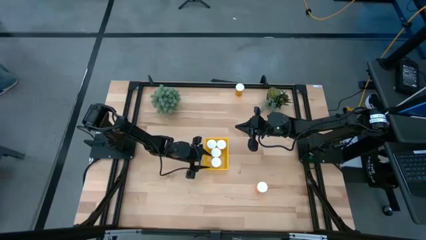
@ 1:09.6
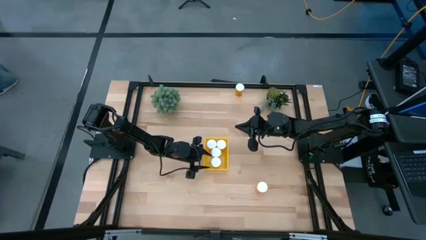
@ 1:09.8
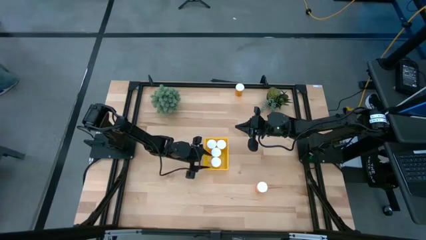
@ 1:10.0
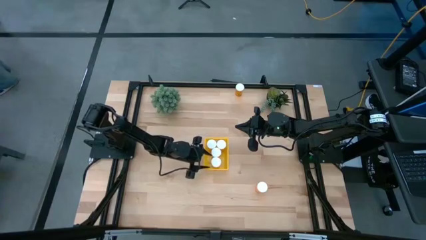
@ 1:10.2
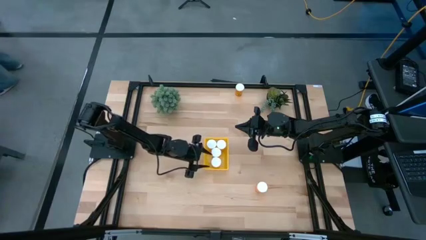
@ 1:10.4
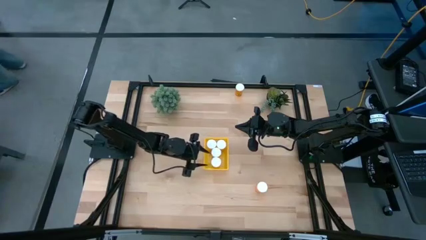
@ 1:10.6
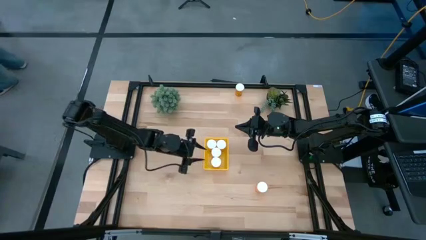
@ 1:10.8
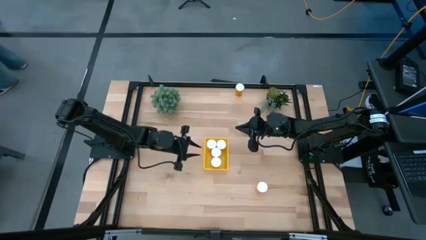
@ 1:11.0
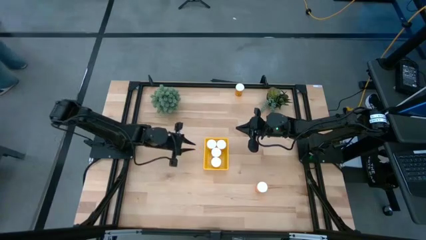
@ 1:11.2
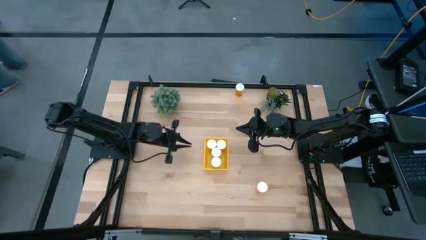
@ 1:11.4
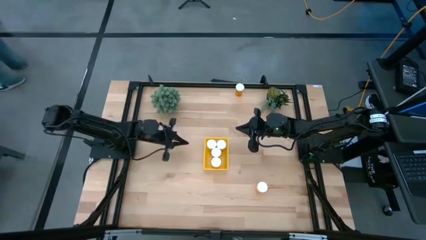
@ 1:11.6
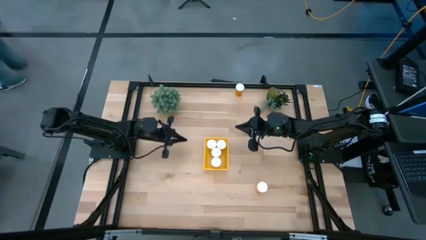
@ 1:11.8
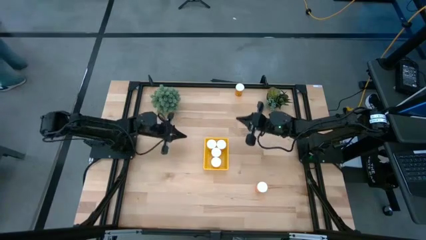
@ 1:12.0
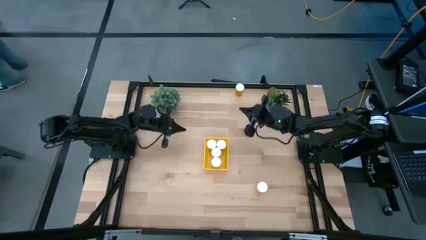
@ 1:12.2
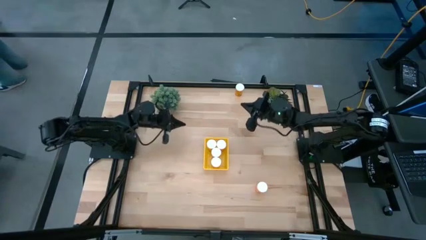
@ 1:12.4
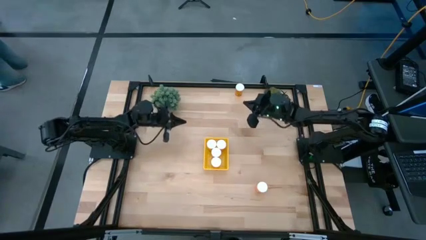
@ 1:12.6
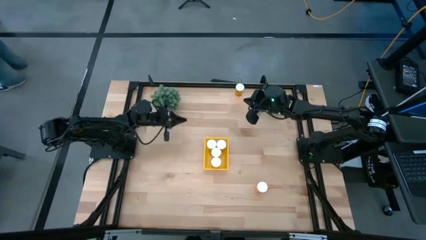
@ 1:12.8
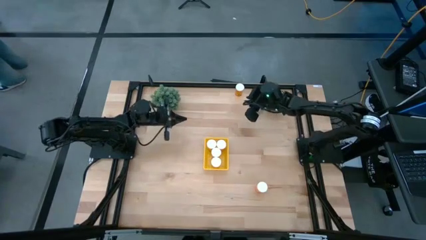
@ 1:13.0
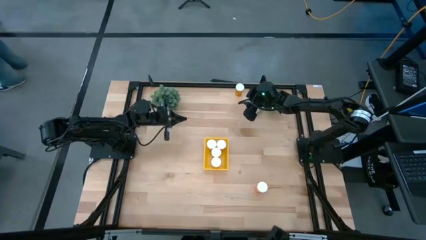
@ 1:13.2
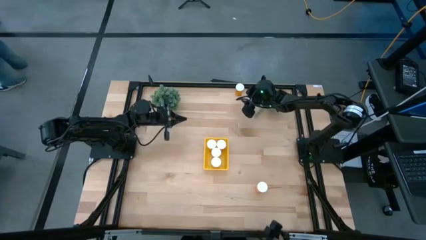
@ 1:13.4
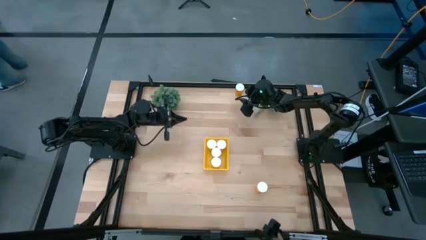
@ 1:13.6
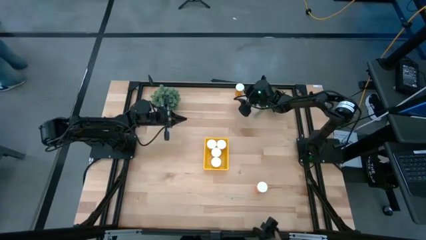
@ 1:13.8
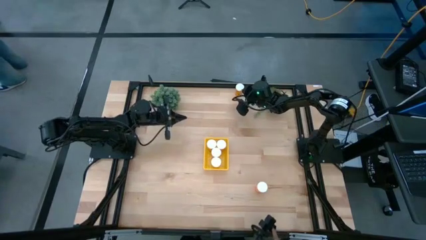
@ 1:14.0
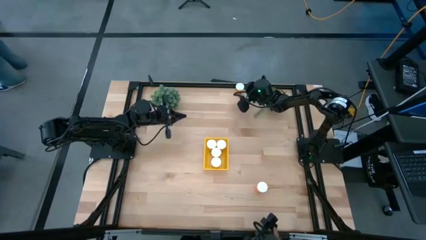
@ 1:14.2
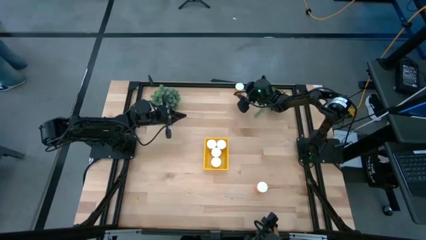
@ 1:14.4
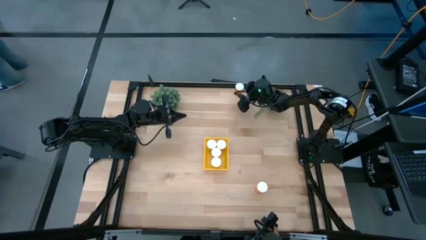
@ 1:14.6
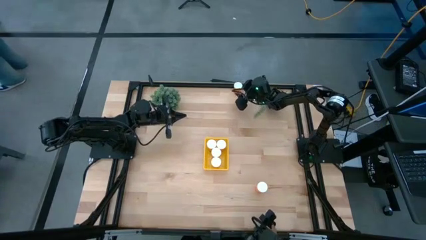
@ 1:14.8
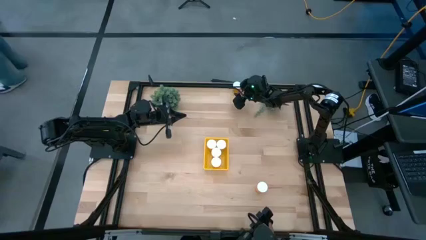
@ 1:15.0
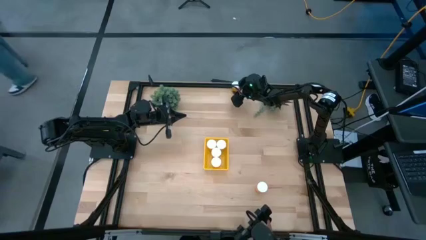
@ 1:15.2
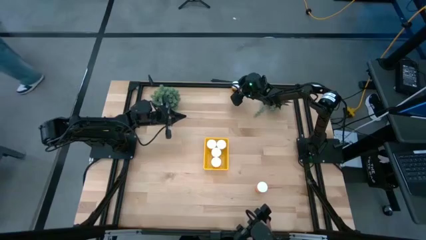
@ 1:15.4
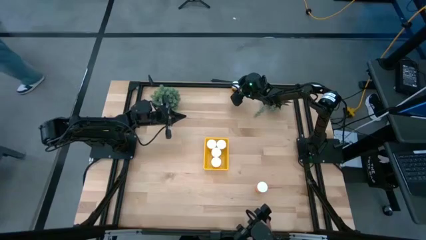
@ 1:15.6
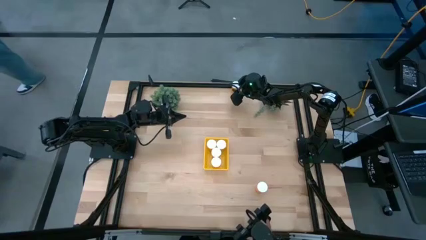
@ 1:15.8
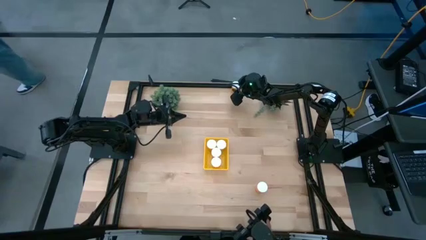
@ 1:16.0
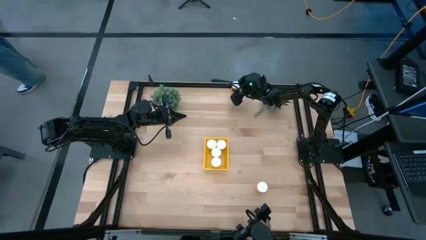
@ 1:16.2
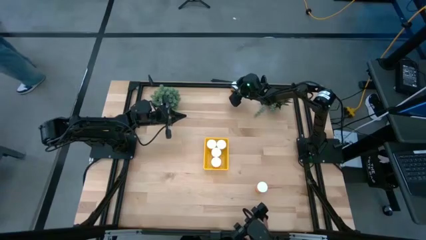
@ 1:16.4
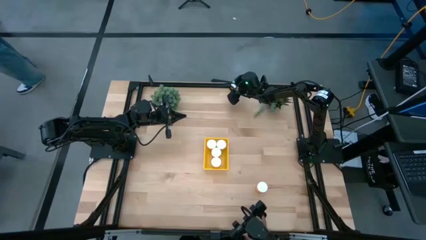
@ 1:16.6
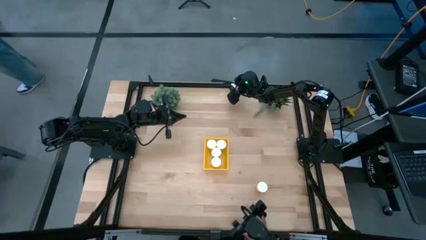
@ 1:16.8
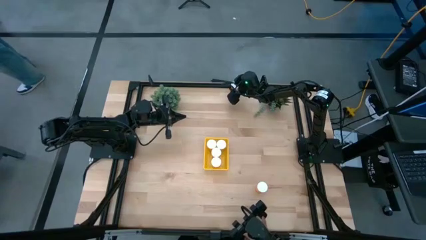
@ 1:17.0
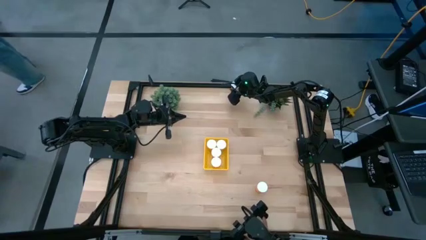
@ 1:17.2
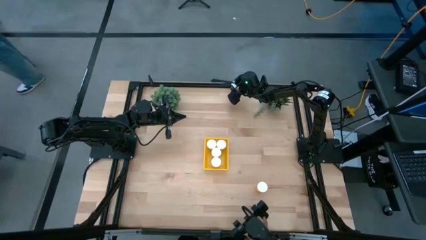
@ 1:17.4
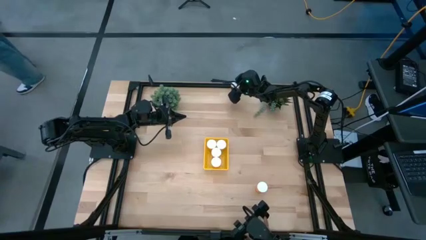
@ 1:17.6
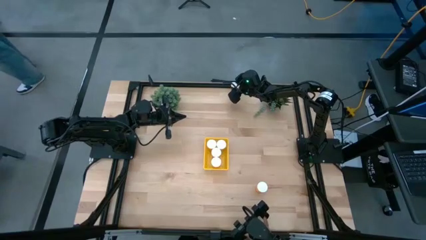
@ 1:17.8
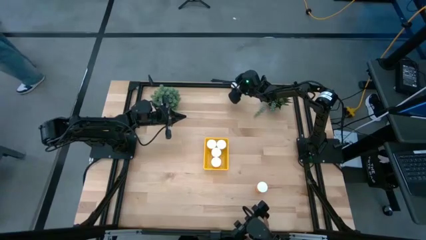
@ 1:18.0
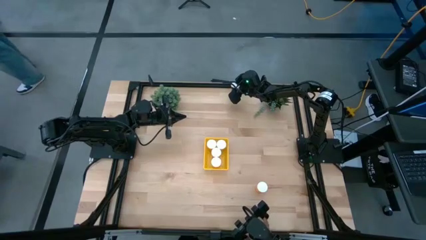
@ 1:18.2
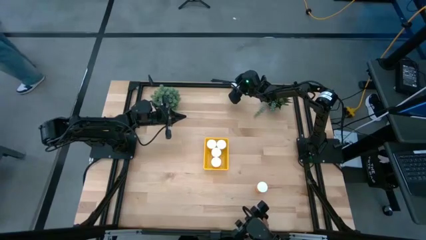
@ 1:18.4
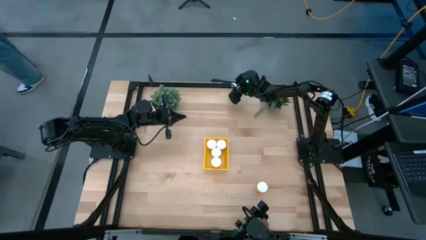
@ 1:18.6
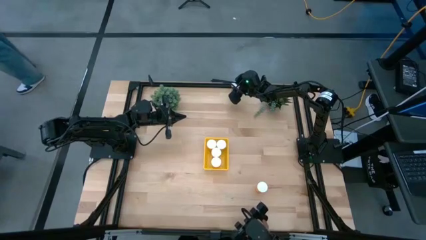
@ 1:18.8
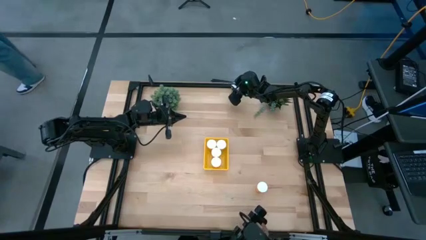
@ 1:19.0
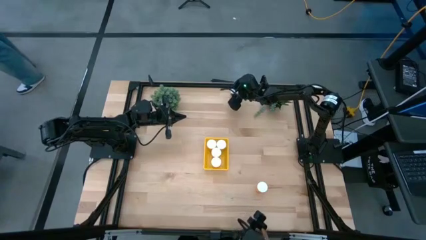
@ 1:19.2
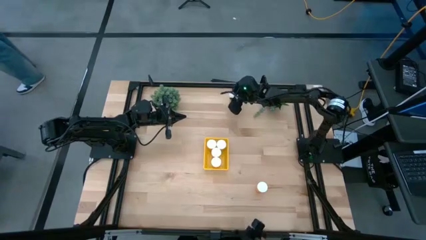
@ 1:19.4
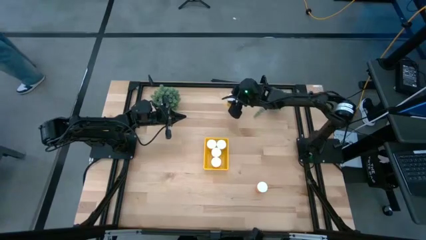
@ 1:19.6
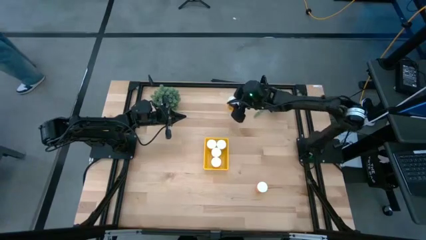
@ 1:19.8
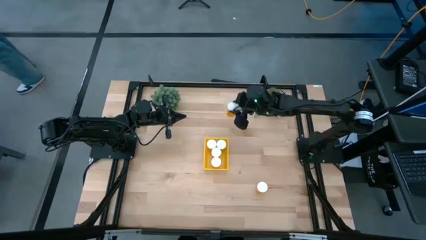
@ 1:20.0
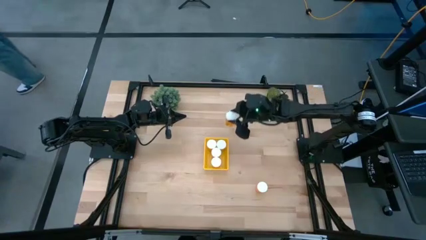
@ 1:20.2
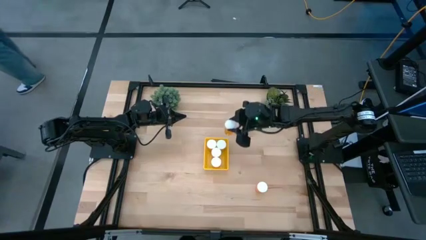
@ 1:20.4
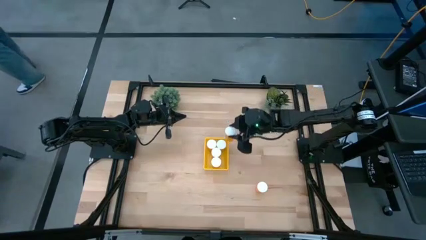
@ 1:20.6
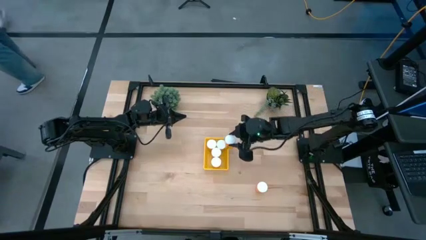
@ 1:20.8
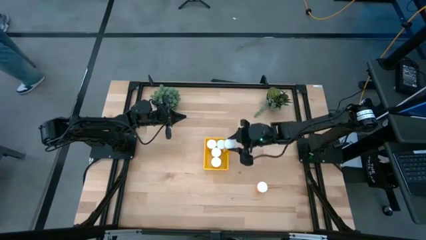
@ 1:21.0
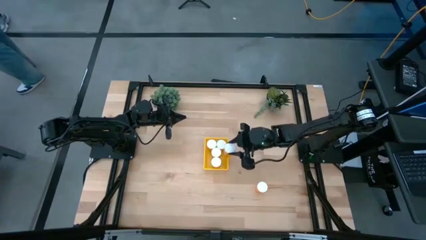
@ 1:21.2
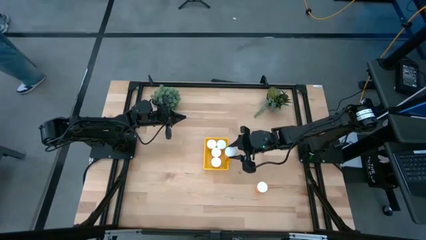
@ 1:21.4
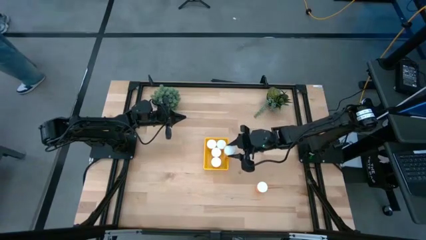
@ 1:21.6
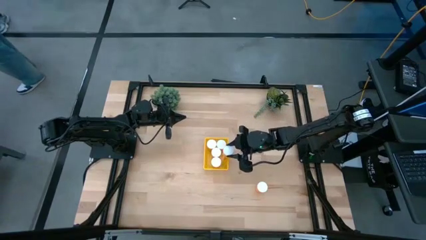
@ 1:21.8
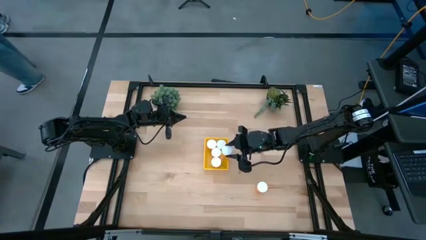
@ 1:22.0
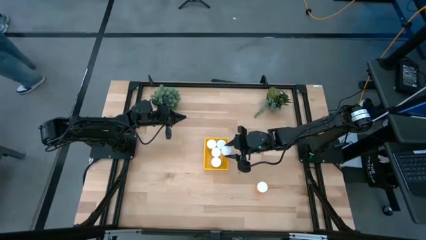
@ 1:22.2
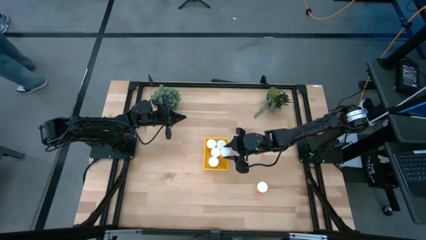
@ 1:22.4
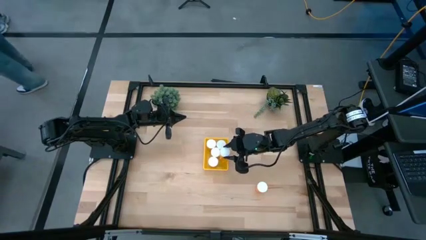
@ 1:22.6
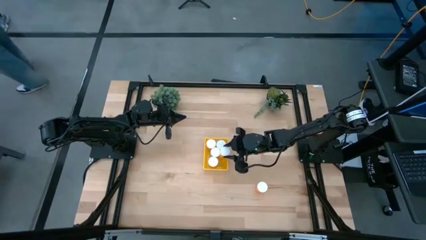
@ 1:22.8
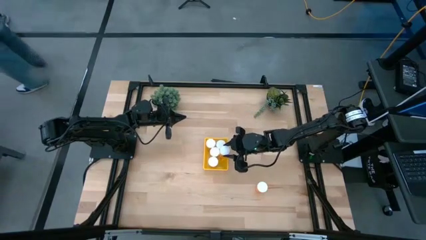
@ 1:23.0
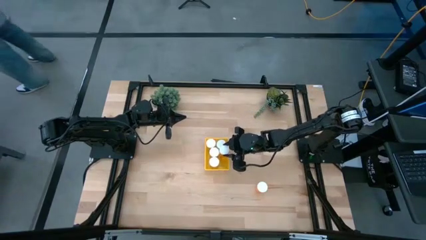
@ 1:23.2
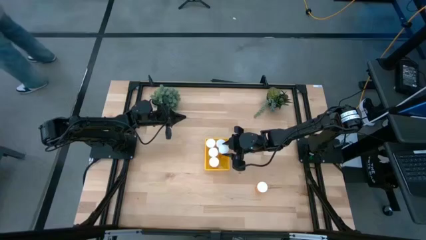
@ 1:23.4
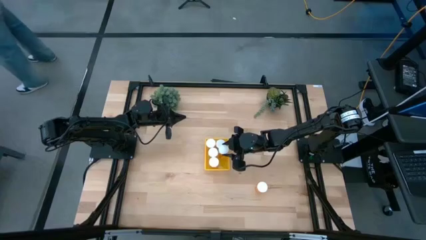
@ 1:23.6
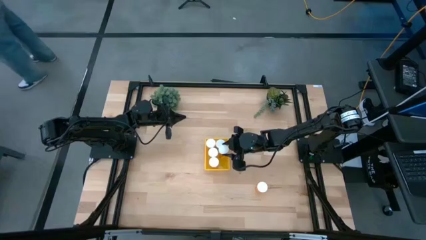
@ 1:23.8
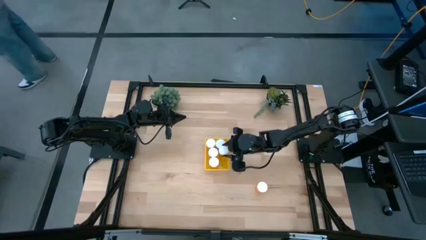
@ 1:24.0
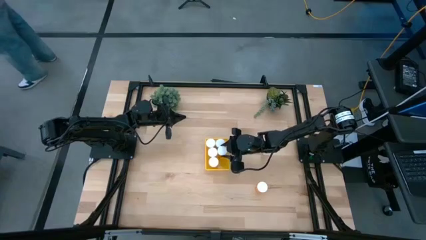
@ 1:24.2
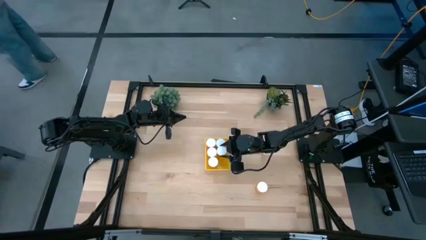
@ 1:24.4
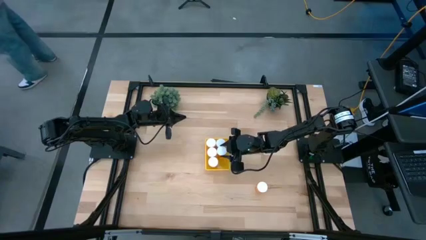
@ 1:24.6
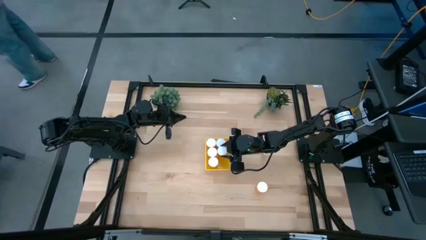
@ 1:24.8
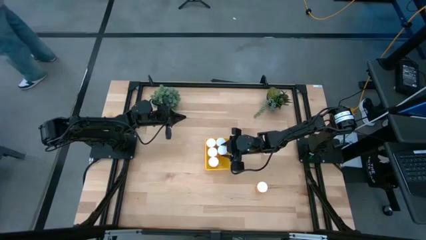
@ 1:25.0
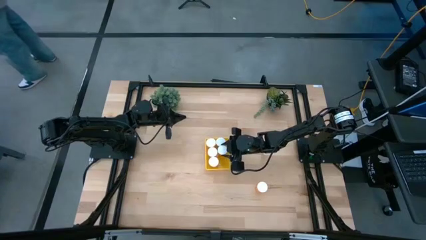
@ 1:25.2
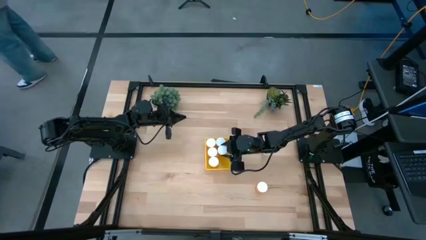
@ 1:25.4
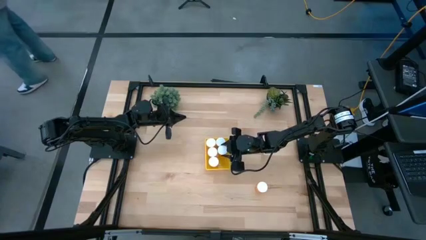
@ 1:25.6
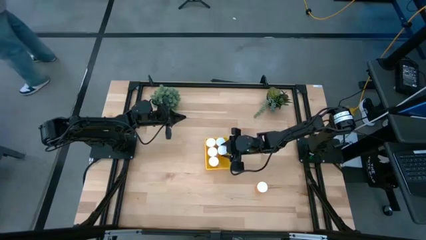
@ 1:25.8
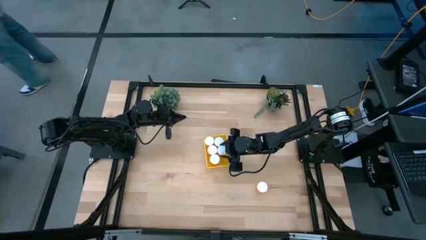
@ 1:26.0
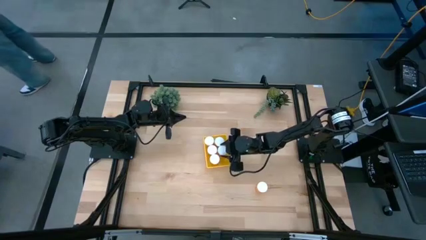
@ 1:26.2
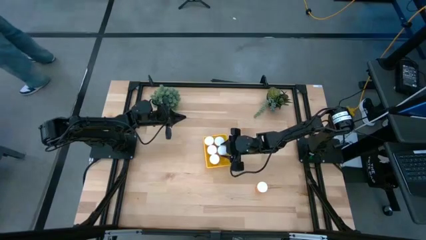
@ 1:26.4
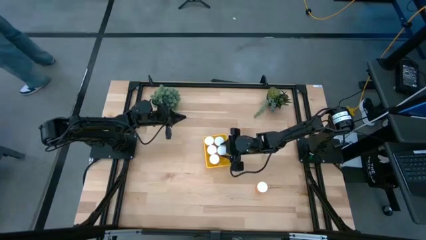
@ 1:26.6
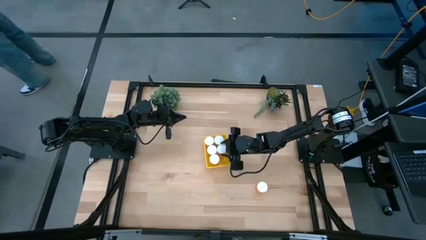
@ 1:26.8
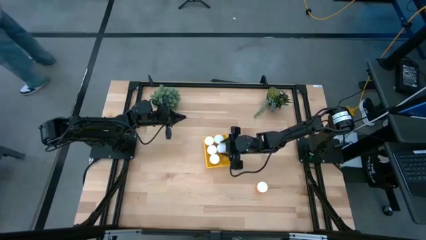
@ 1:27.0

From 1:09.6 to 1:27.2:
Task: Pick and place pill bottles into a basket
Put the orange pill bottle into the yellow bin
